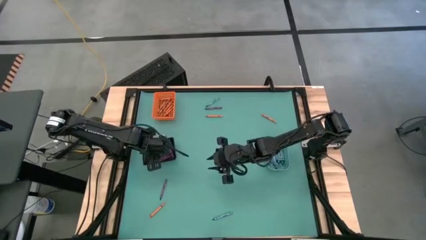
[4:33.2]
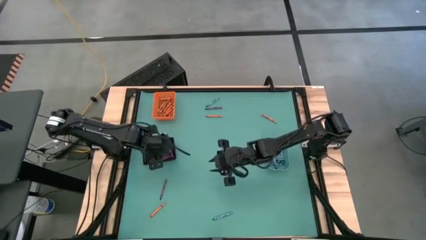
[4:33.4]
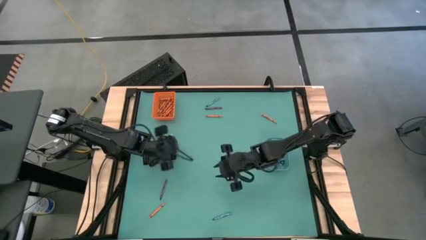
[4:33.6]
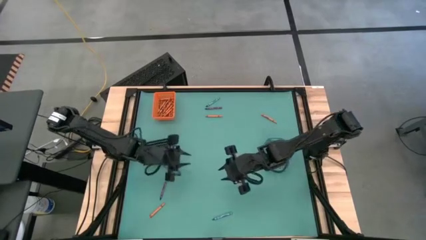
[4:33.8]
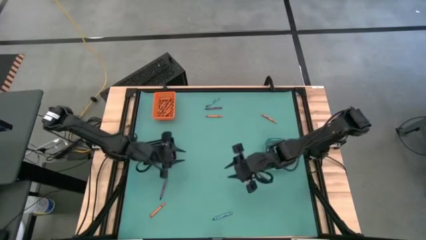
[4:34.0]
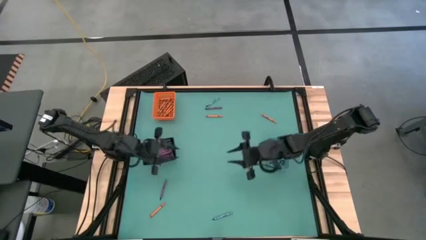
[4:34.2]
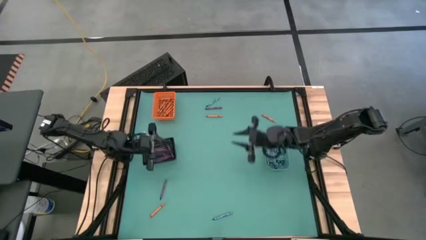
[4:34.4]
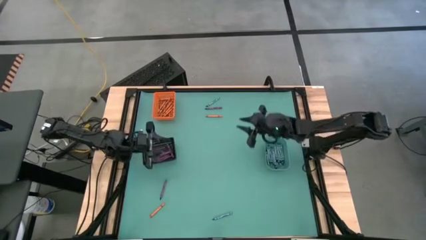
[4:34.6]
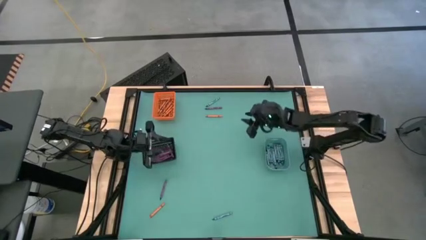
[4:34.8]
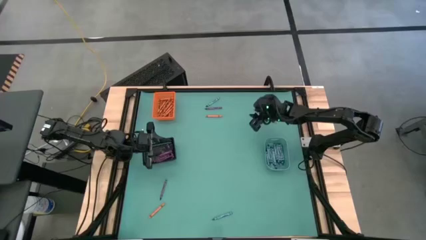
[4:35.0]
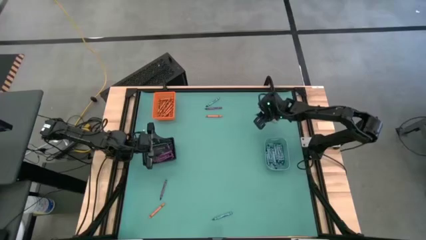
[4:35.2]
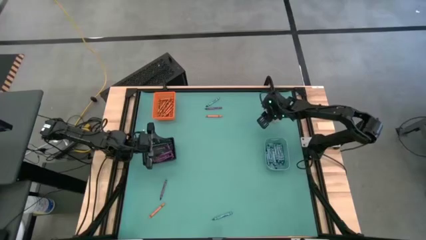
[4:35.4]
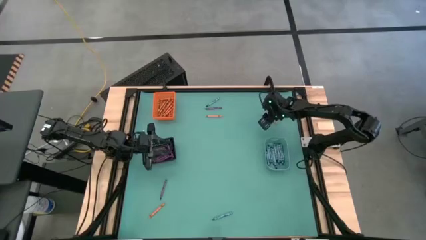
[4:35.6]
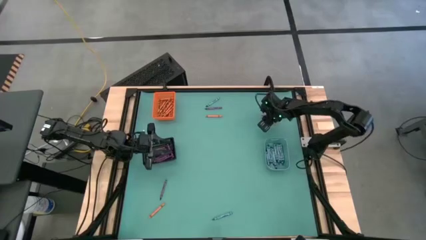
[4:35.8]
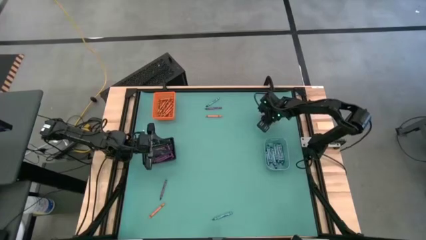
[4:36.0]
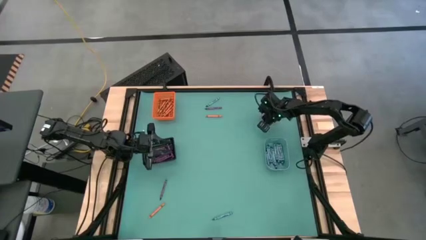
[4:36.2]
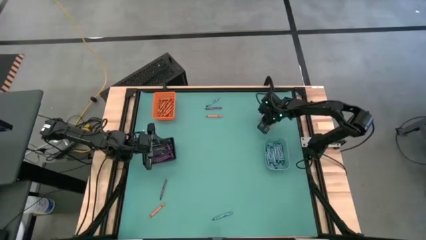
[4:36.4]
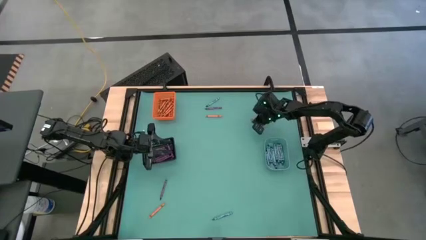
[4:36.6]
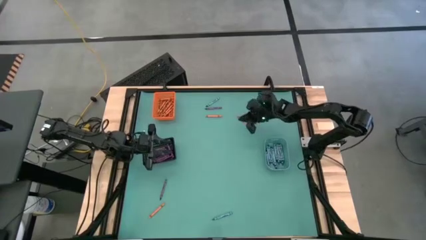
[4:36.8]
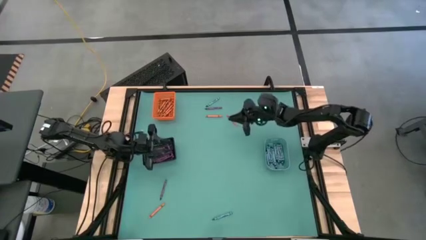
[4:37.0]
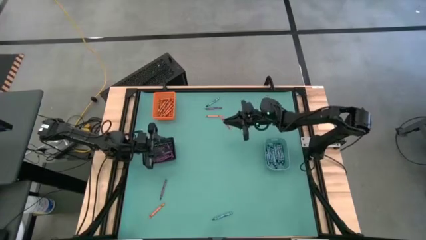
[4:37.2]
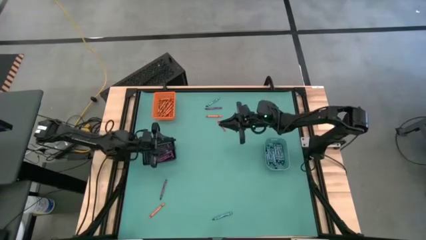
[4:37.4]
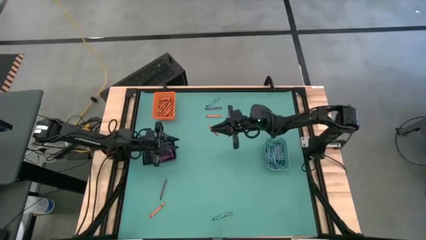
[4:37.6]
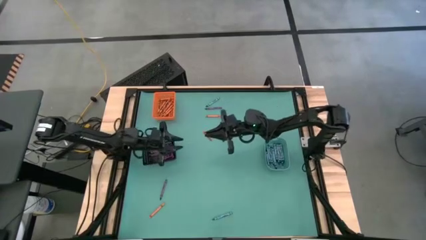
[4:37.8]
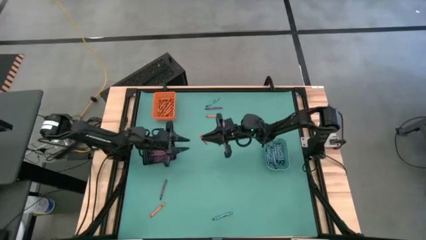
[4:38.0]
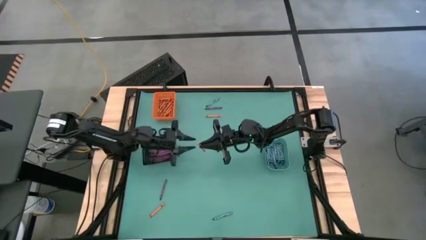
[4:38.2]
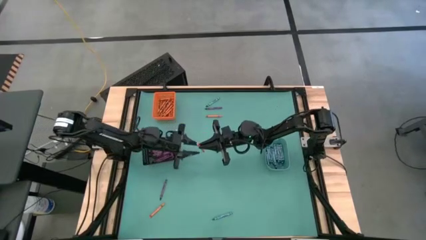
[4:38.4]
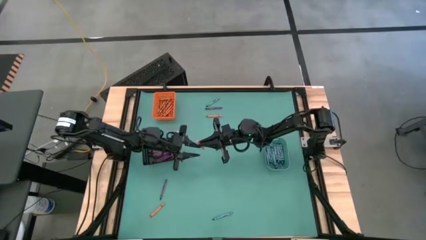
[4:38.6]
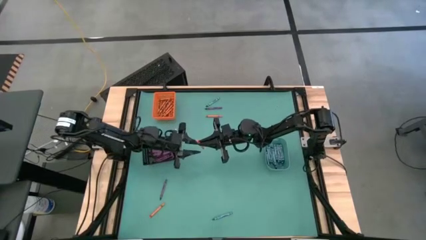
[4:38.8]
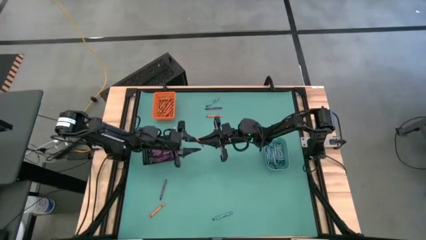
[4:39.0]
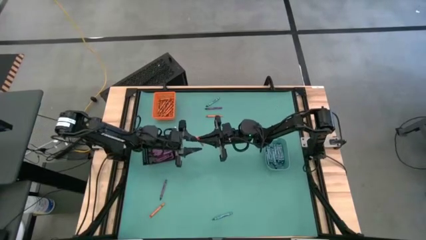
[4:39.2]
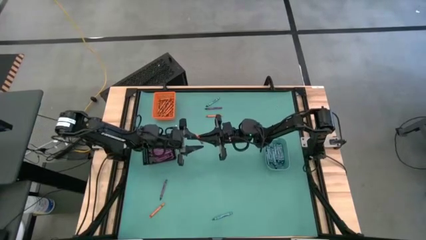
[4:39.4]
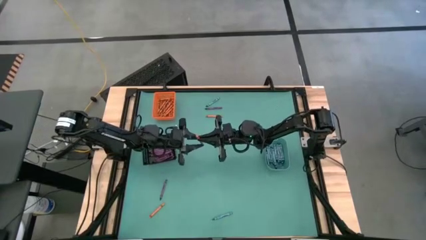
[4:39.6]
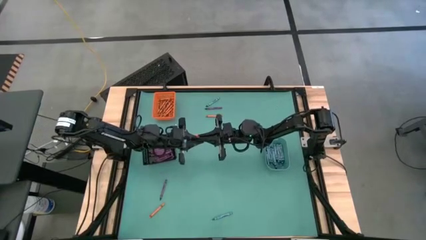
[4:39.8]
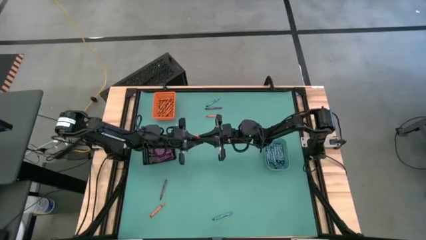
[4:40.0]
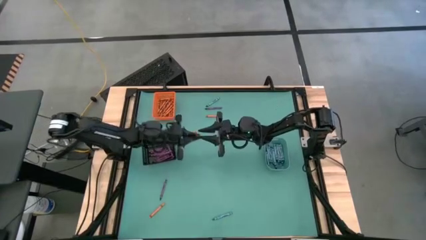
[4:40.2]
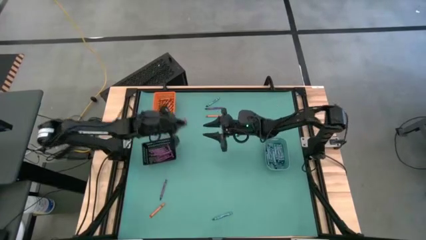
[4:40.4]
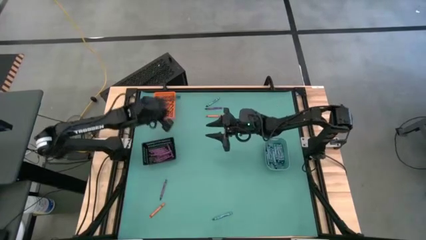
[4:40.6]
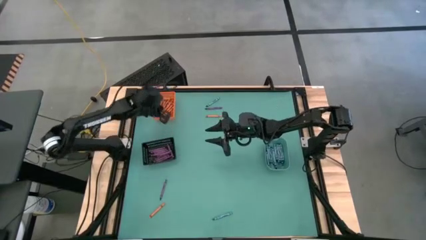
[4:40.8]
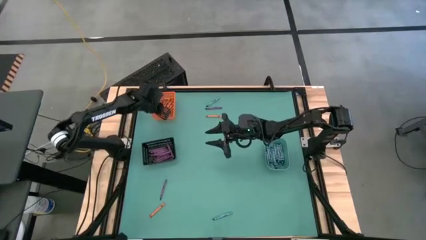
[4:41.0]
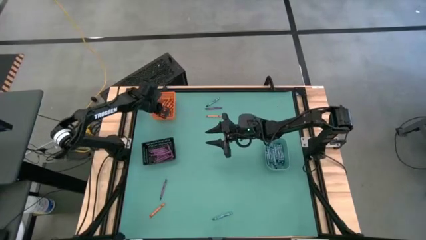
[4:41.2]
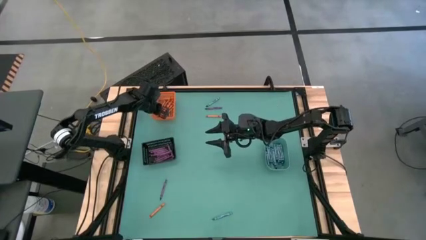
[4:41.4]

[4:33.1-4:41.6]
Task: Sort crayons
Put the orange crayon into the orange bin

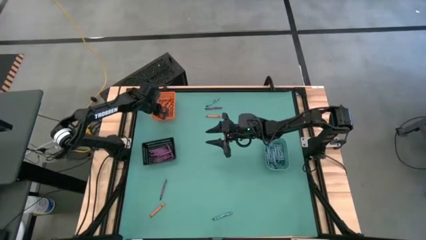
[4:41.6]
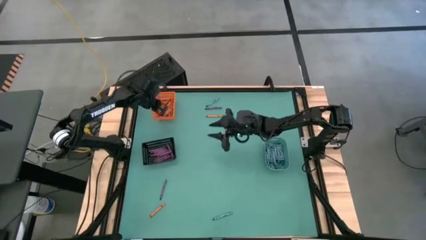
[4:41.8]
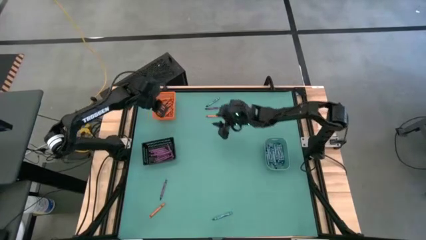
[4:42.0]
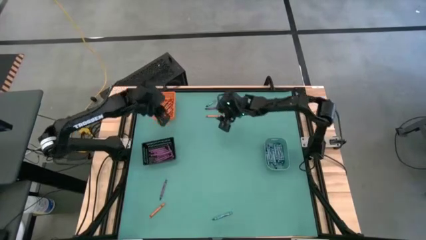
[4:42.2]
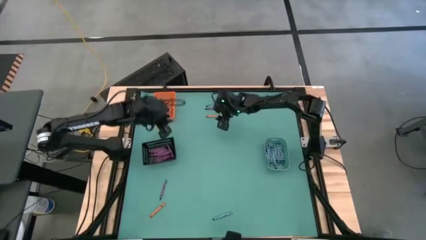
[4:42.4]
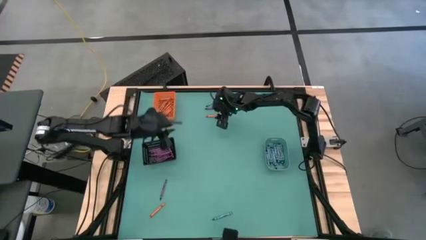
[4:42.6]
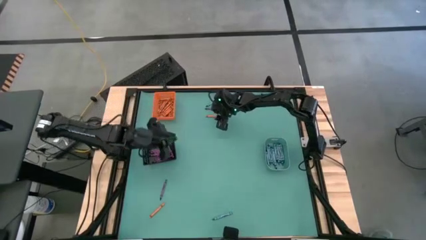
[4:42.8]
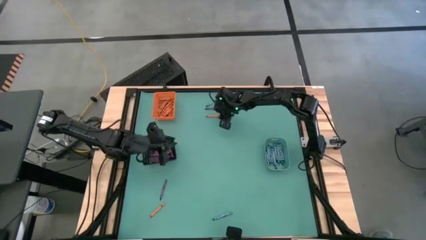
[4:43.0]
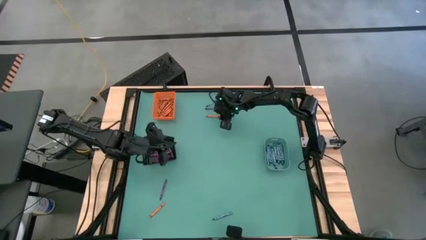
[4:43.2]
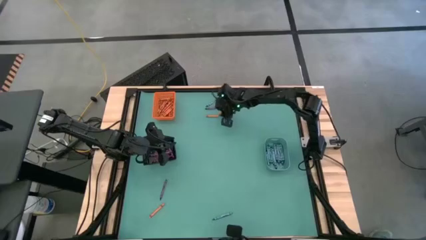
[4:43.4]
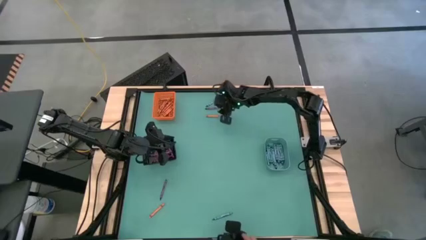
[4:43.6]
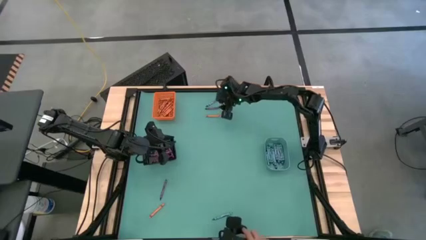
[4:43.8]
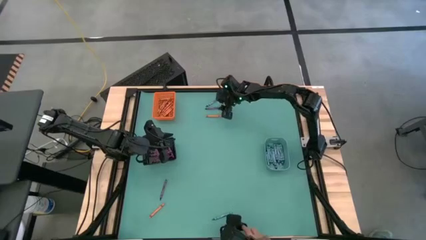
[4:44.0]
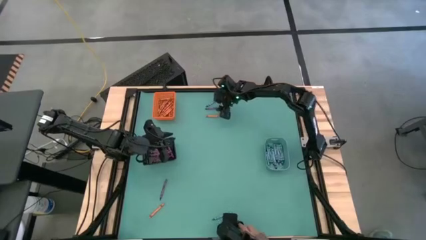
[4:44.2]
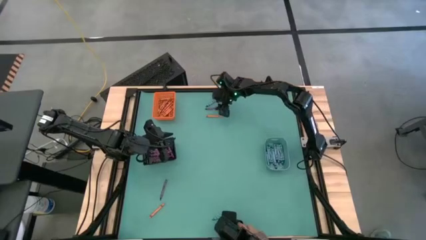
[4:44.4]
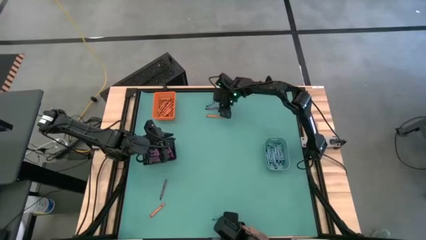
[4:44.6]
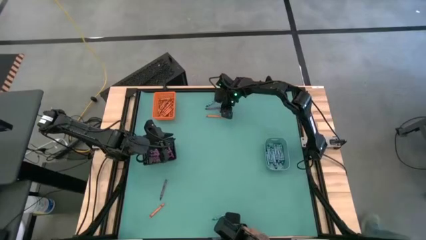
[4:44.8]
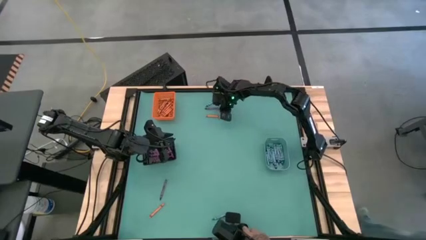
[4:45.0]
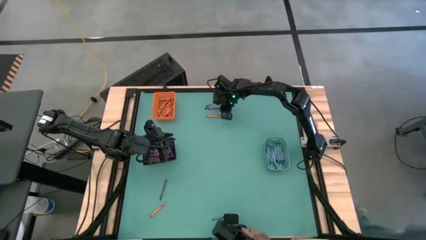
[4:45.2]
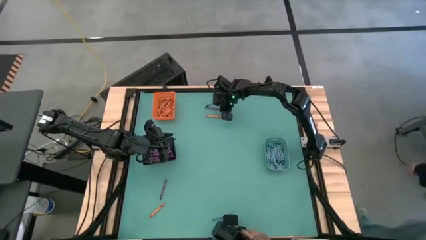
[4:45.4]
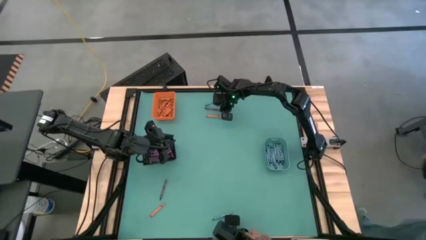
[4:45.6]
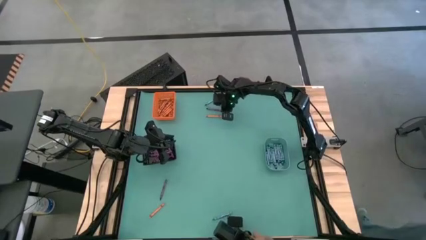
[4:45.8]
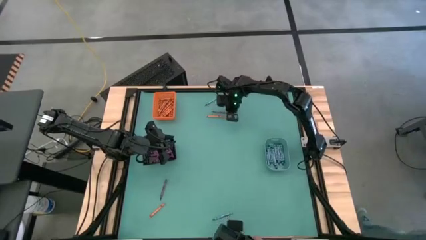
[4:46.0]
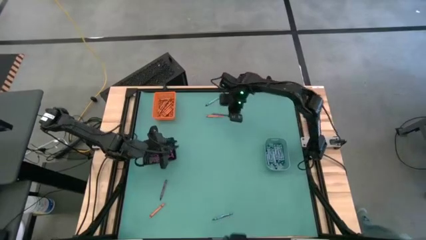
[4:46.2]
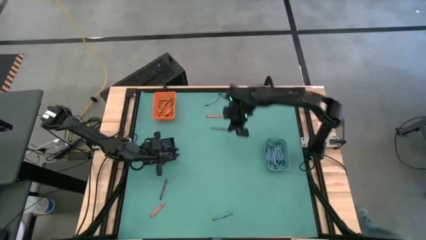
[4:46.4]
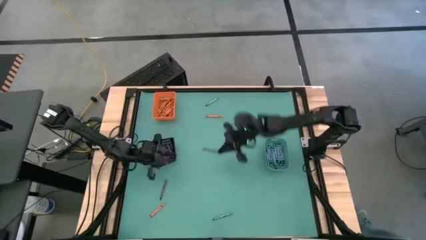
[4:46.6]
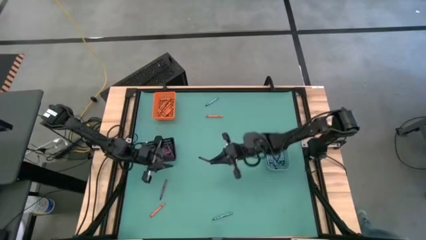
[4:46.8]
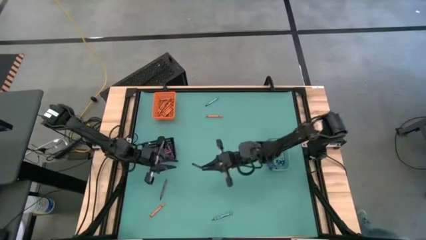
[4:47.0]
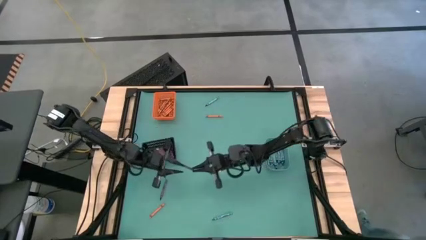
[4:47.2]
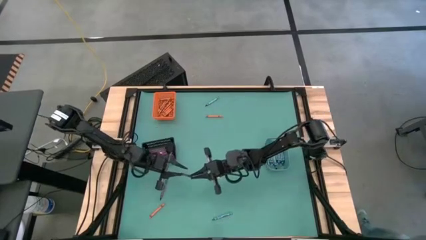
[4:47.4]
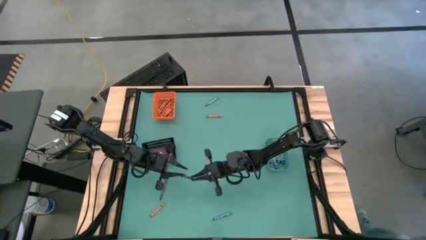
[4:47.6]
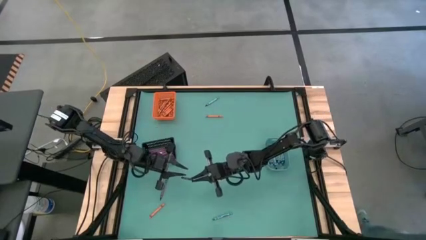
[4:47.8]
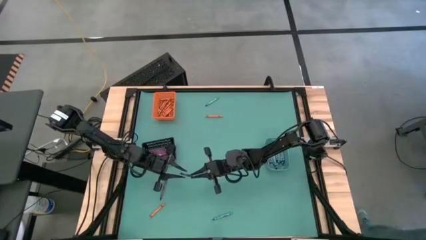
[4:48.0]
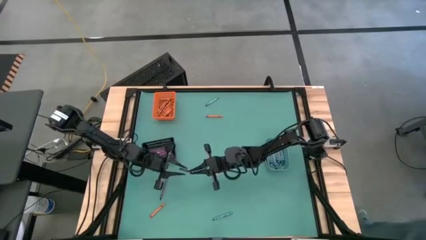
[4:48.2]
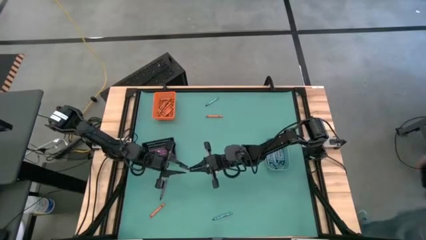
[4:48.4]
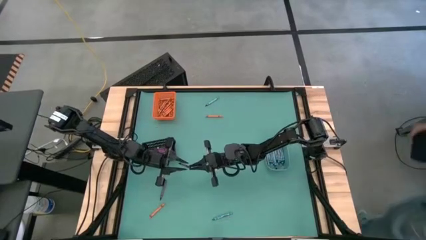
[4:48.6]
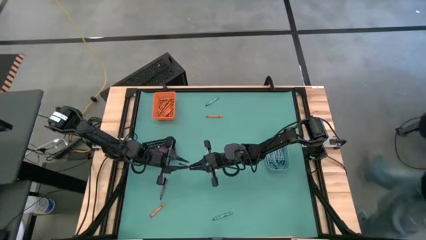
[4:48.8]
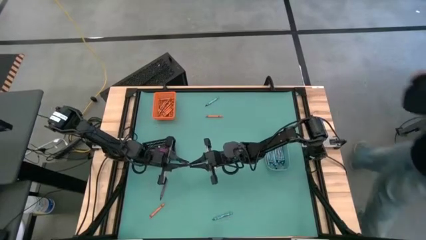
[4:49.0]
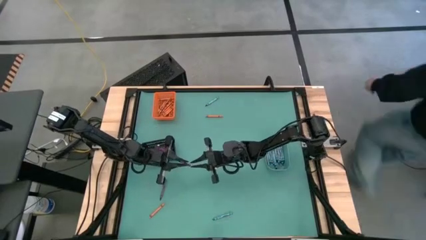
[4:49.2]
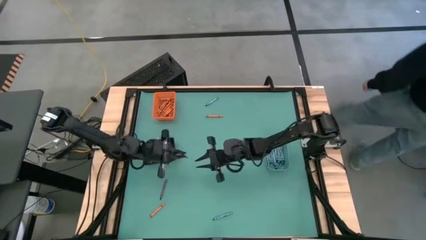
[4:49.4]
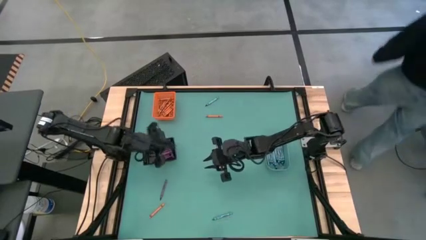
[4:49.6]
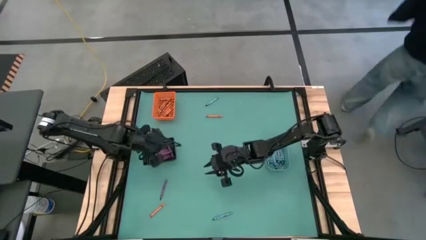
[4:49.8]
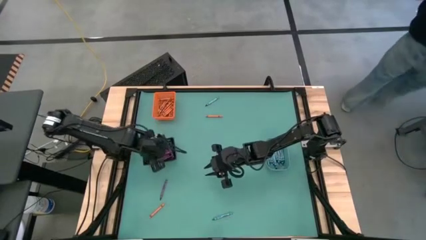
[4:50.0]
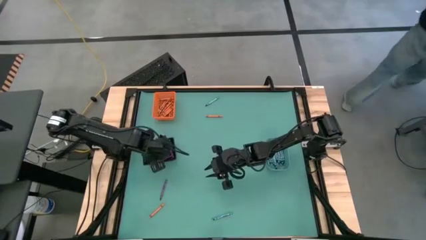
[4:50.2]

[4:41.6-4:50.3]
Put the violet crayon into the black bin
